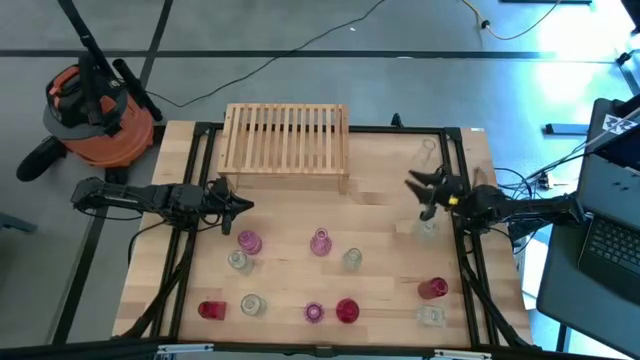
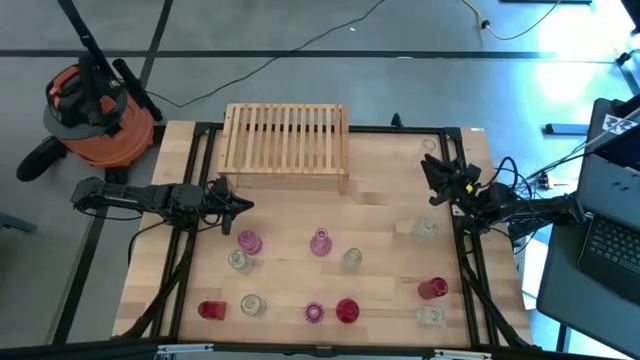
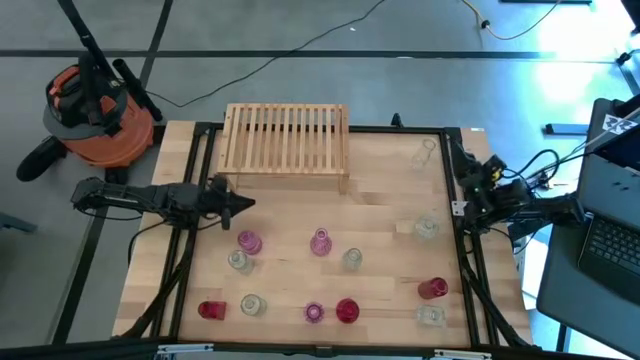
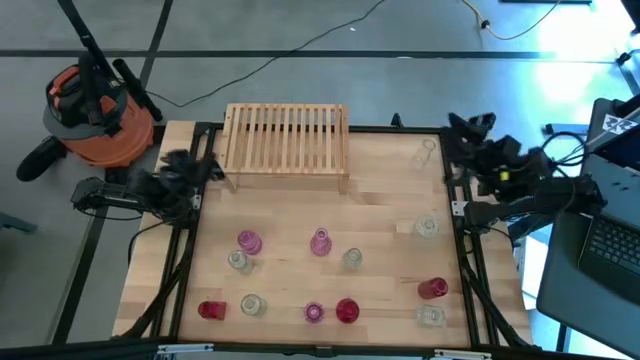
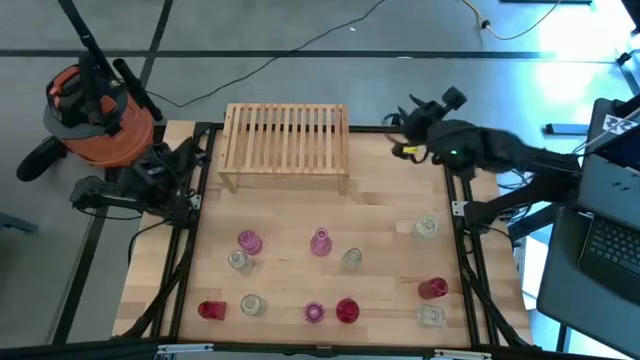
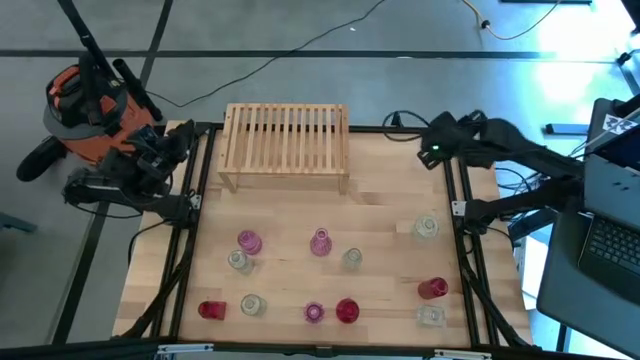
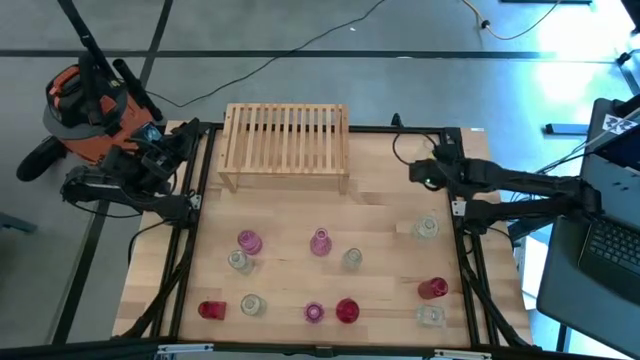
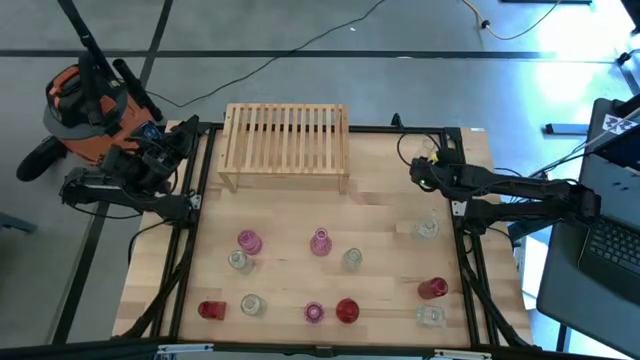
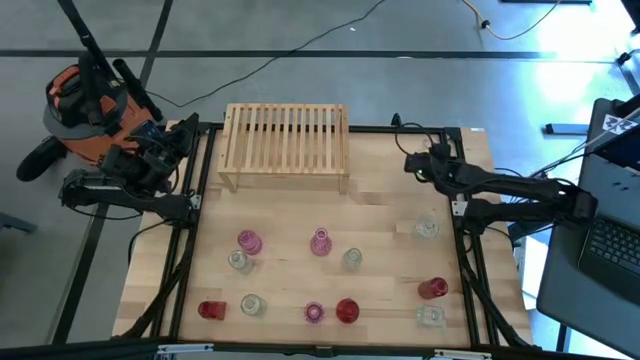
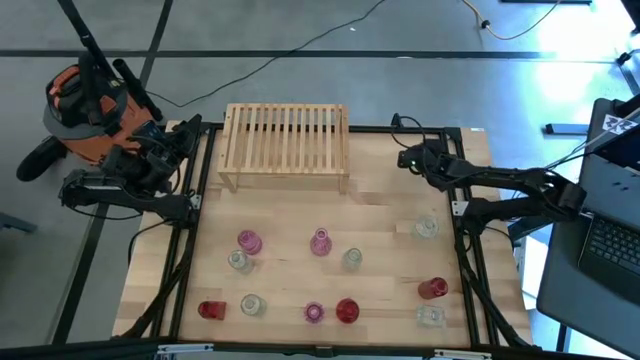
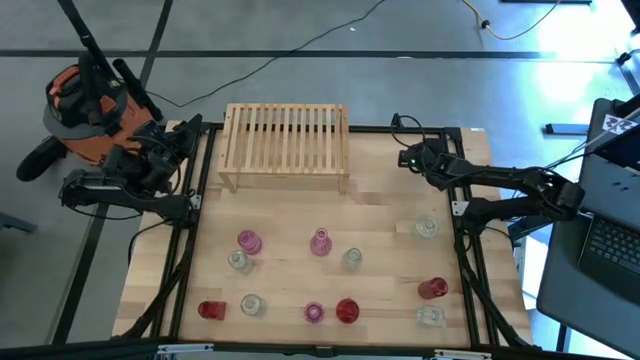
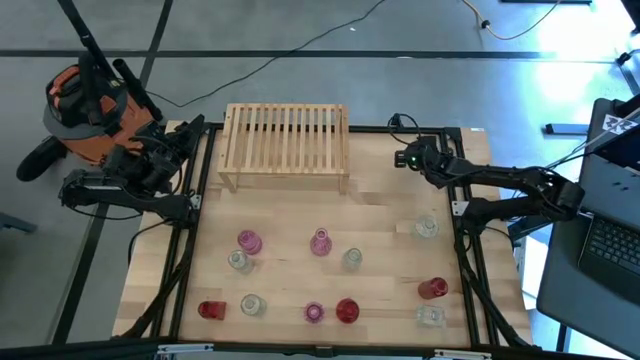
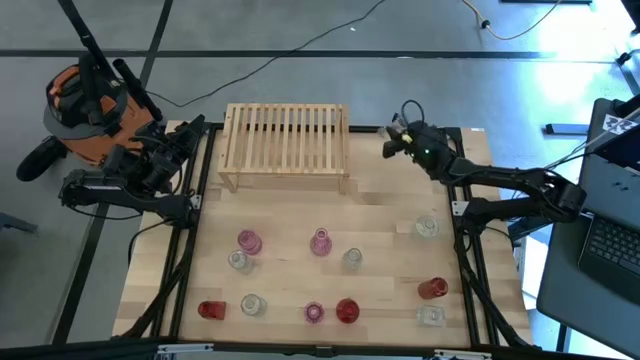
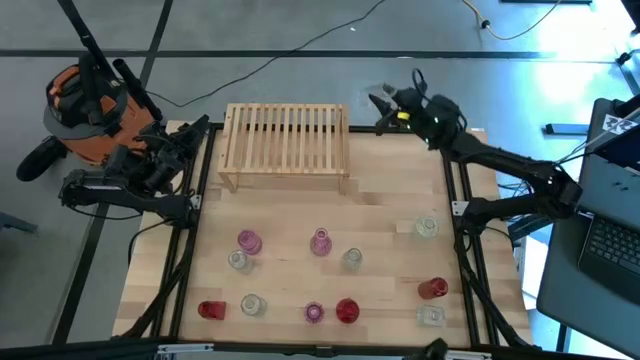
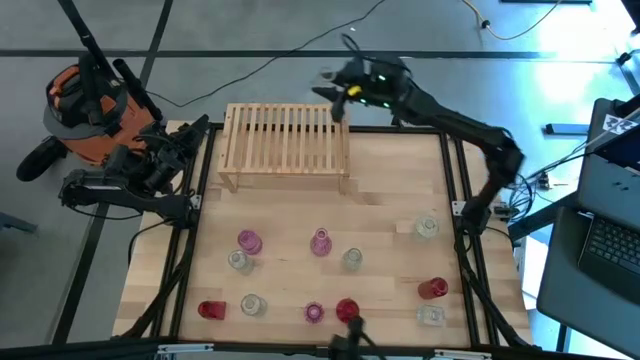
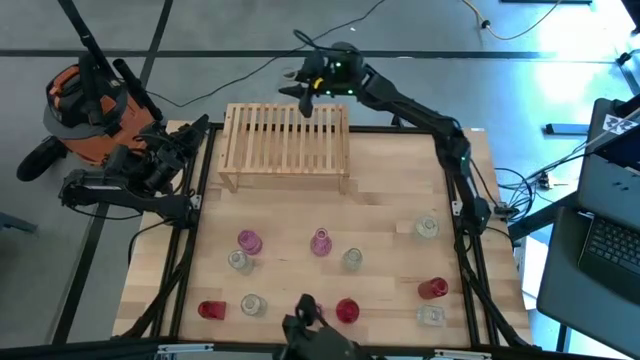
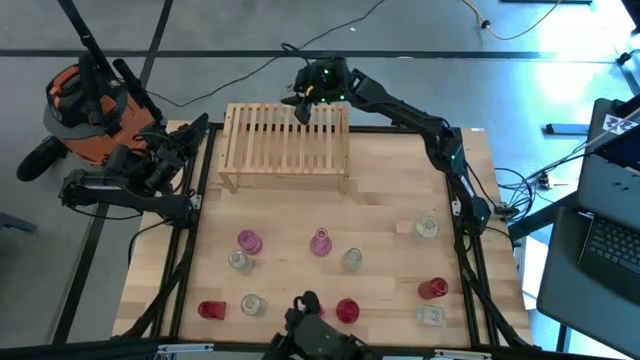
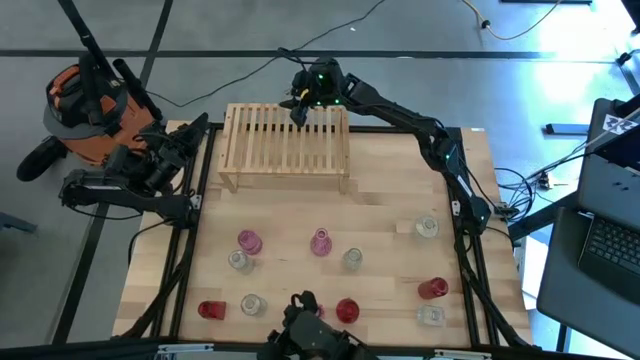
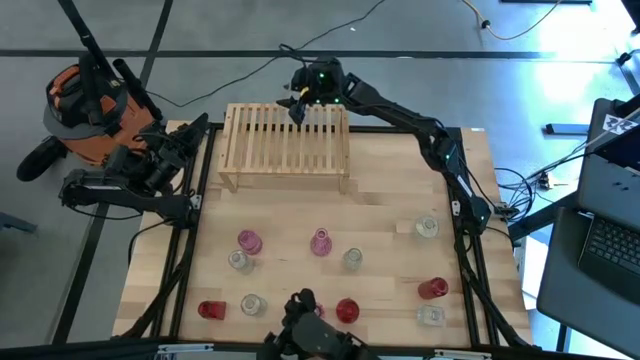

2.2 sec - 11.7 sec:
Task: sort vases onto shelf
Put the transparent vase on the shelf

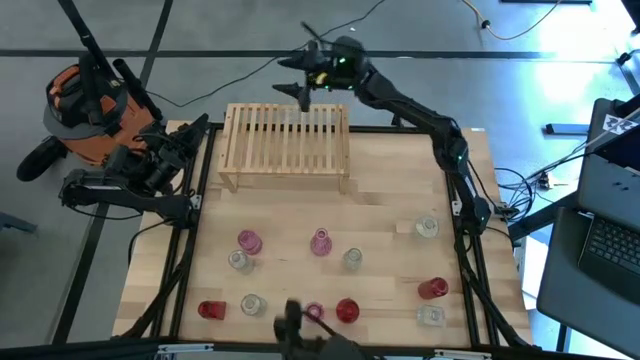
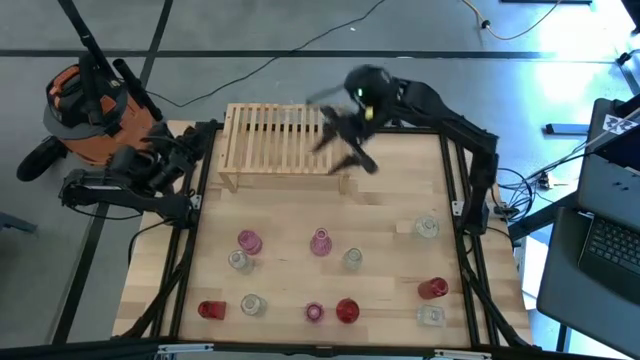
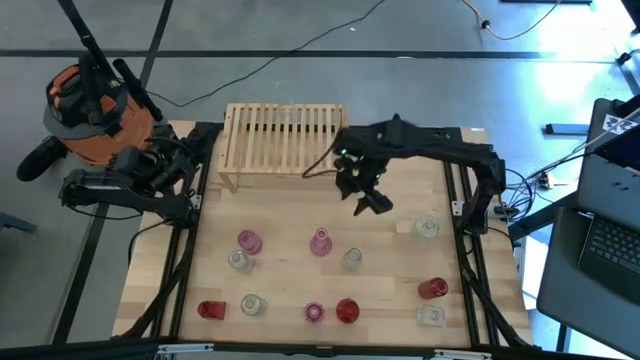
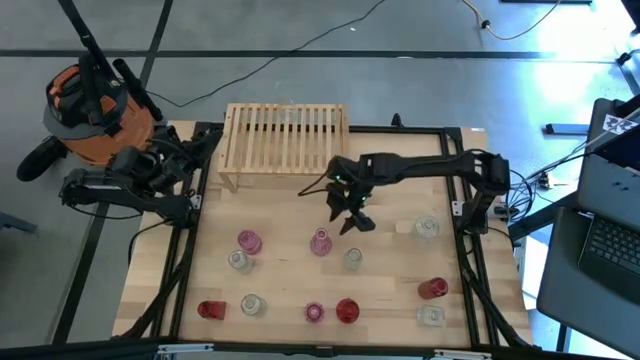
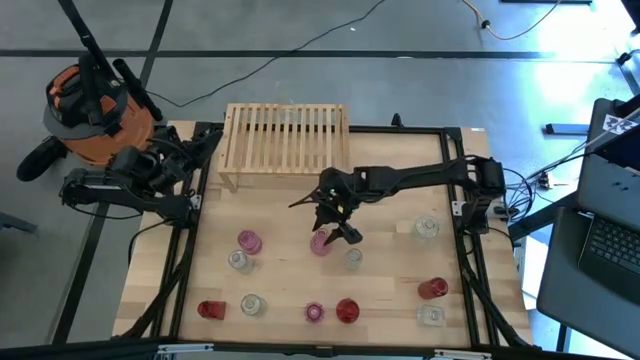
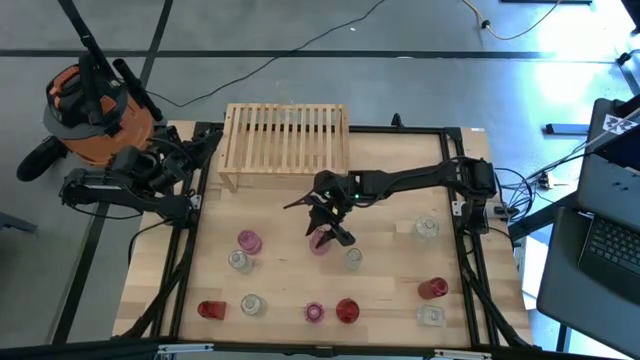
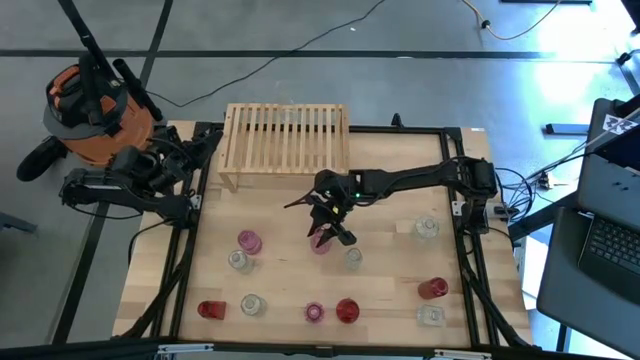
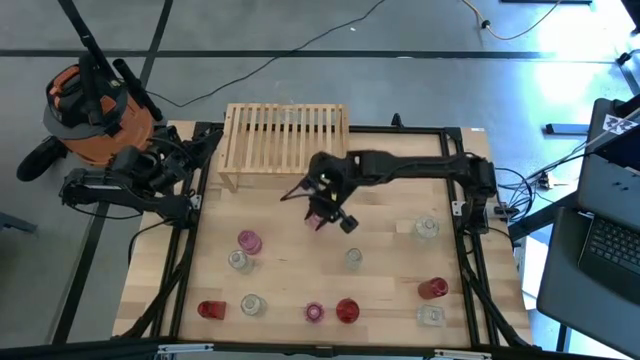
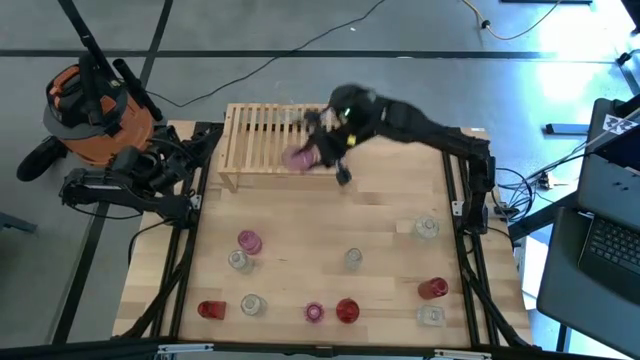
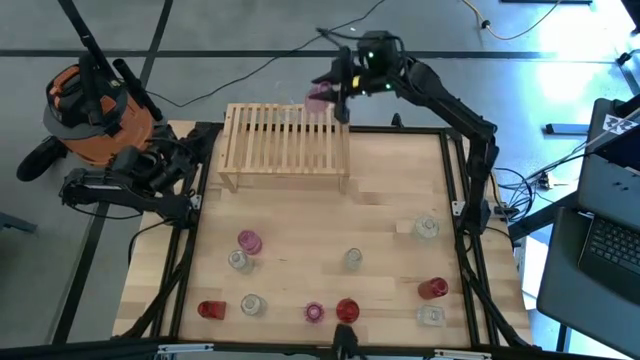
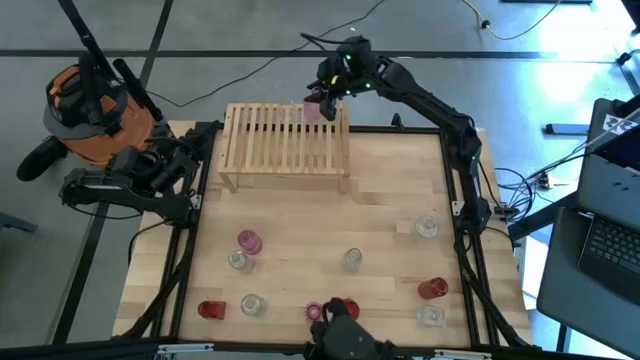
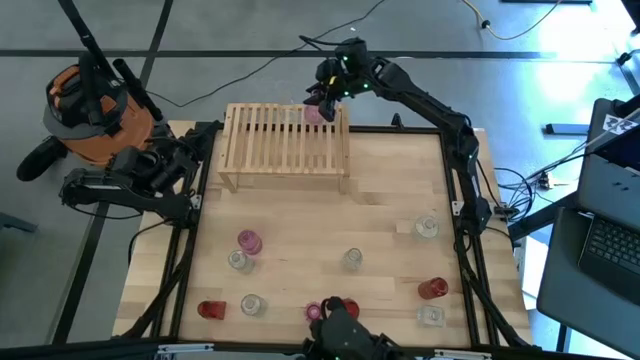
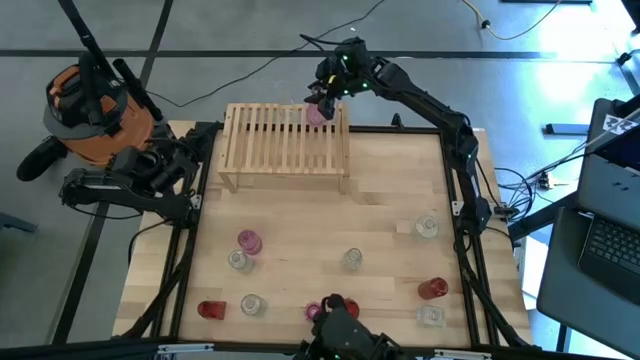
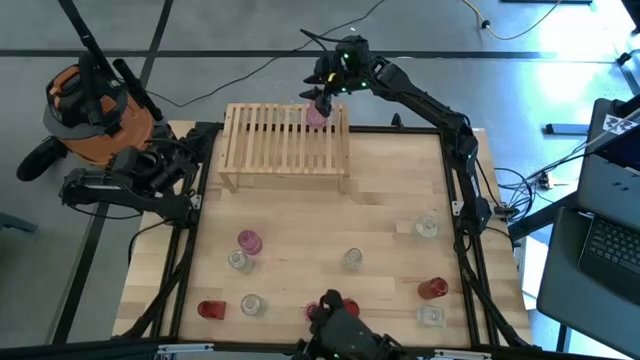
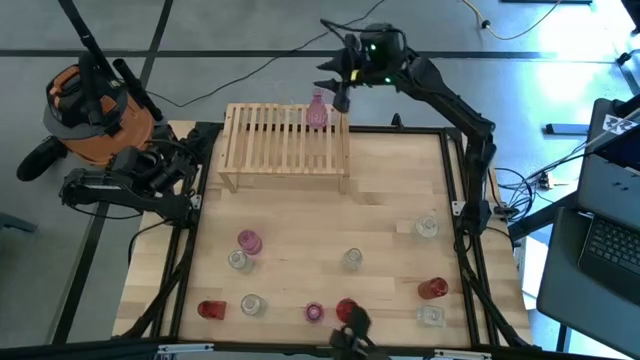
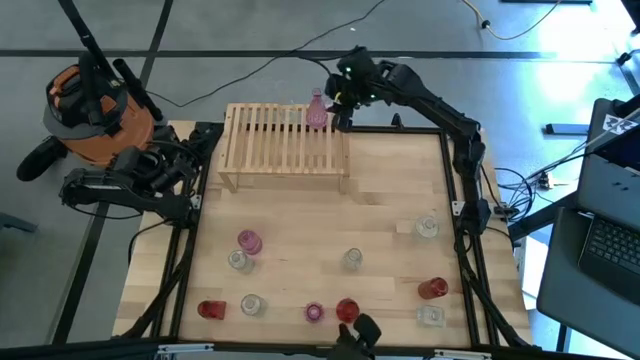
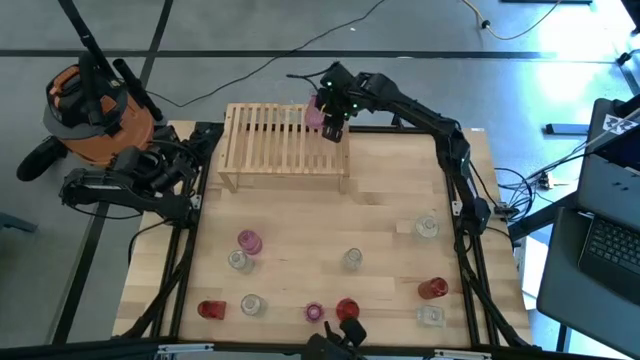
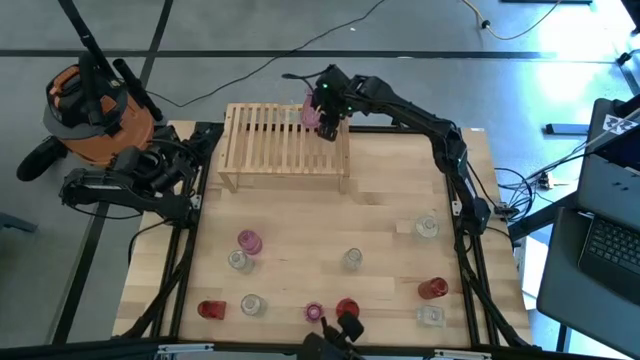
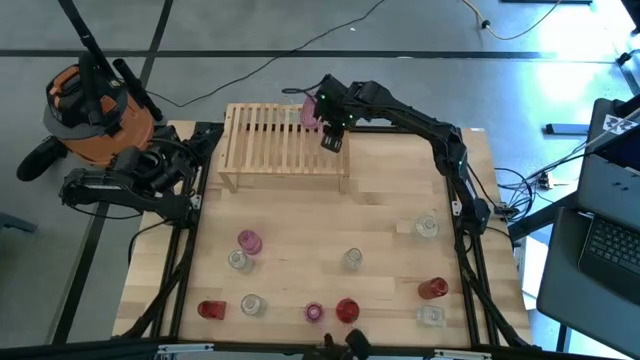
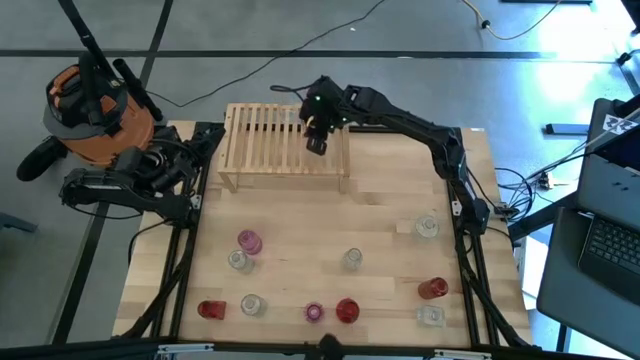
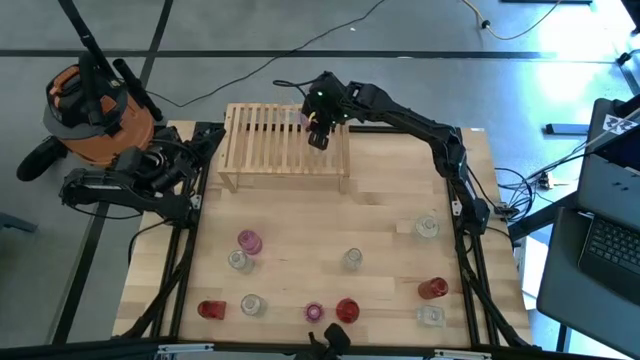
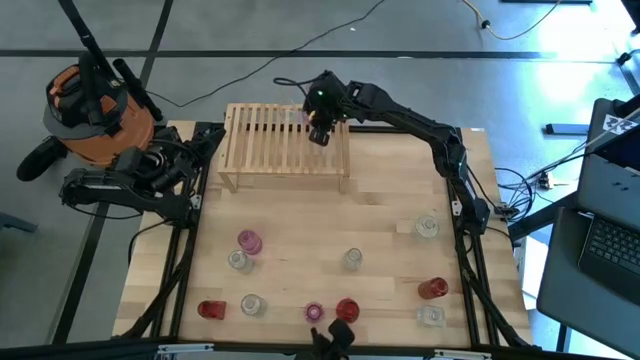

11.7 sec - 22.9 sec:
Put the pink vase on the shelf
